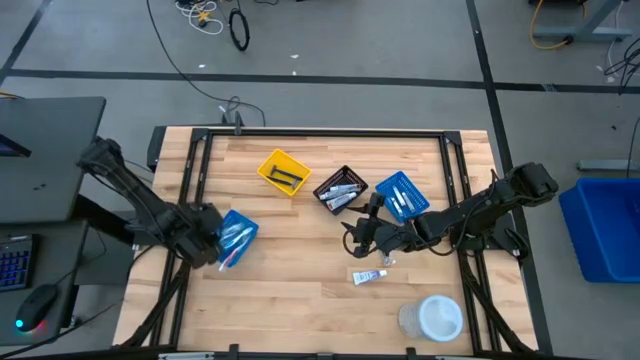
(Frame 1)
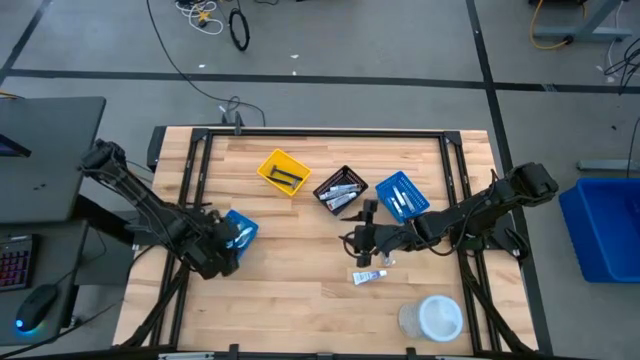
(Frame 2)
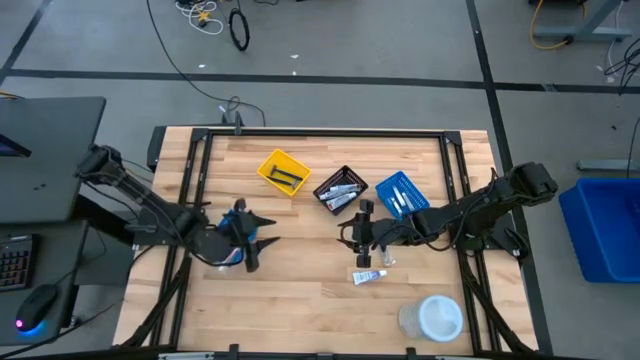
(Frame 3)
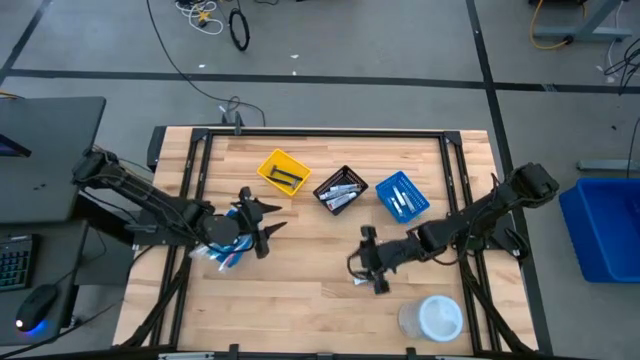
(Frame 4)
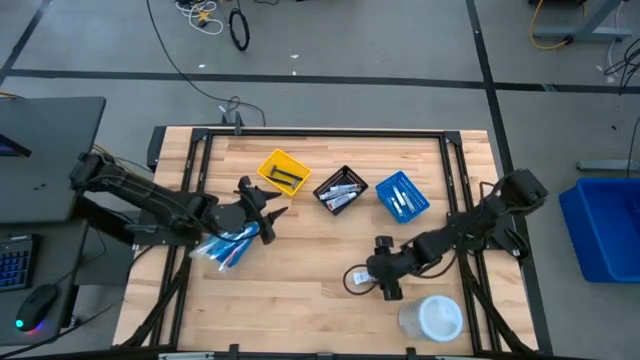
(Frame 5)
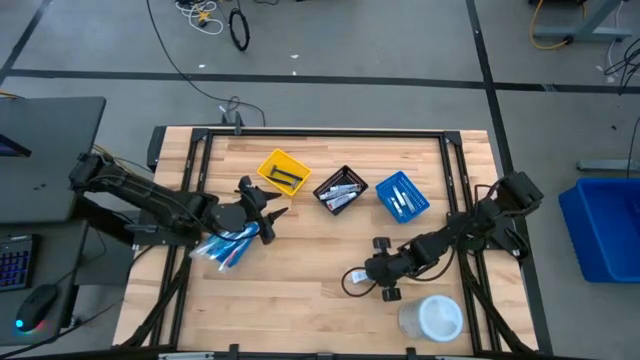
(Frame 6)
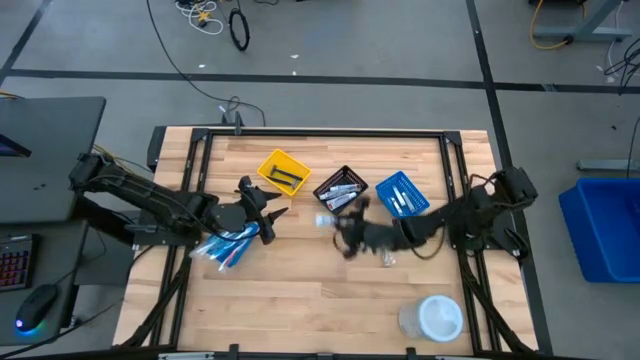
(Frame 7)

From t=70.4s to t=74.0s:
Task: Pick & Place Travel size toiletries
Put the white toothpaste into the black bin

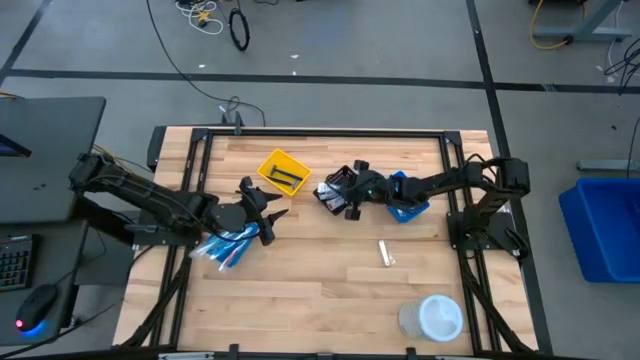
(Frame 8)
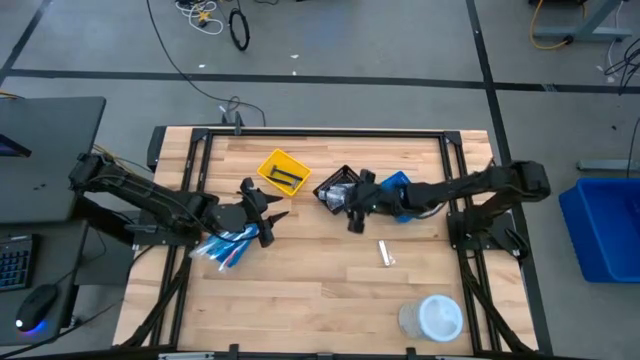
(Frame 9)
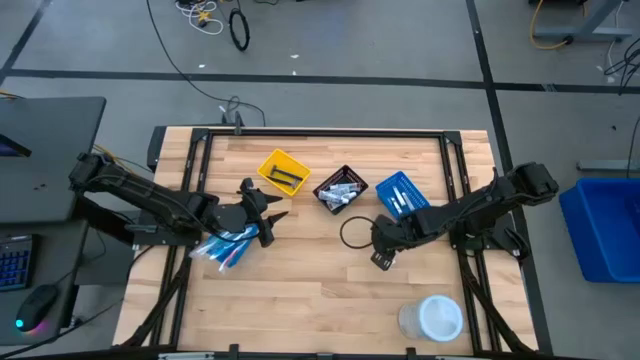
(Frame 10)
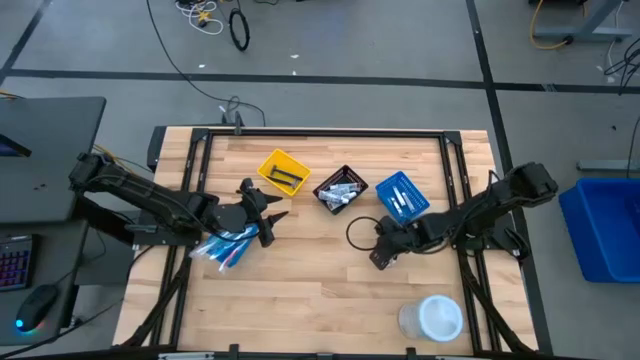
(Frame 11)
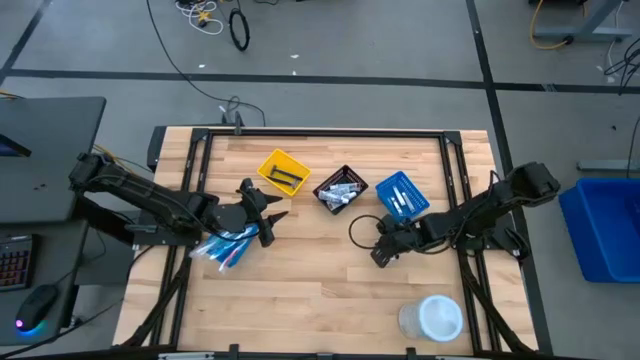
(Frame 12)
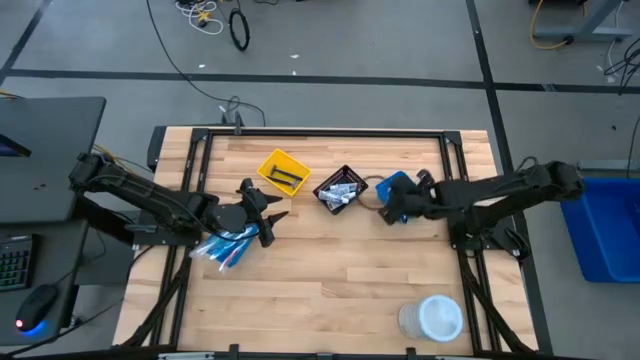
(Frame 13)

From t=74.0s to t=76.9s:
Put the silver nail cutter into the right blue bin

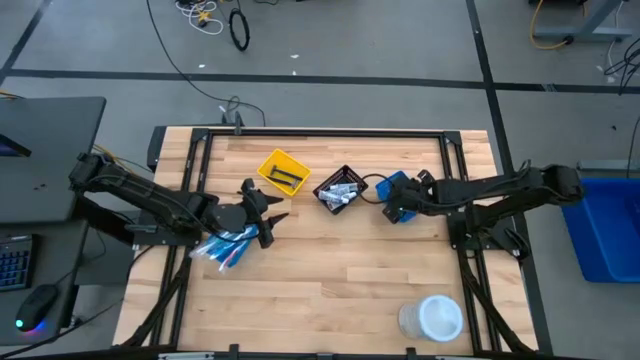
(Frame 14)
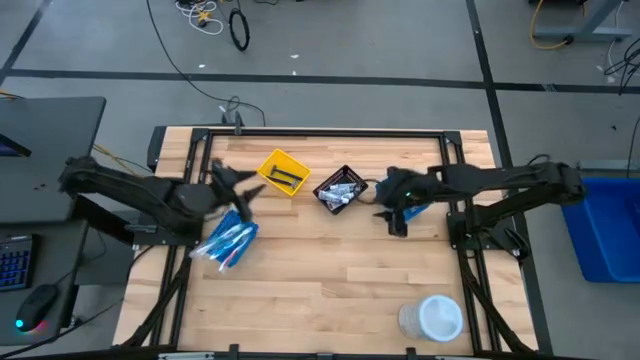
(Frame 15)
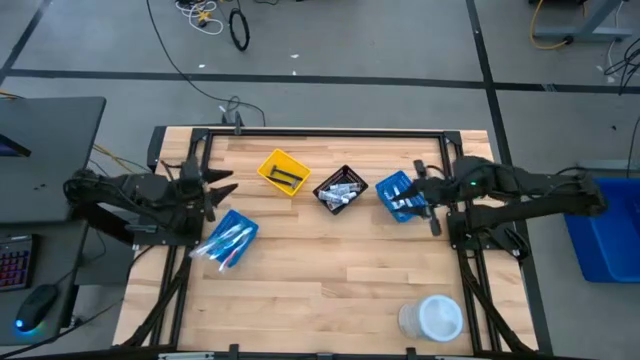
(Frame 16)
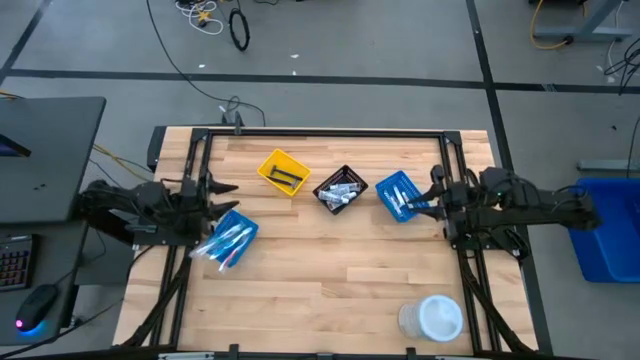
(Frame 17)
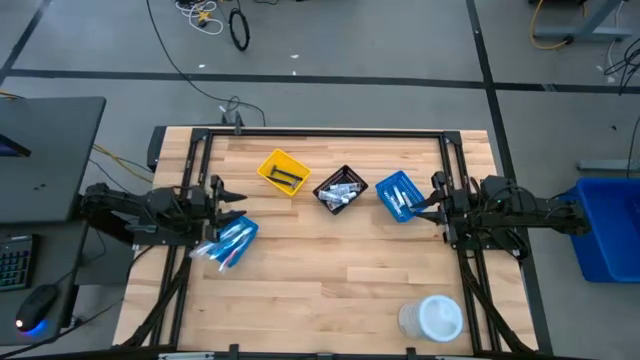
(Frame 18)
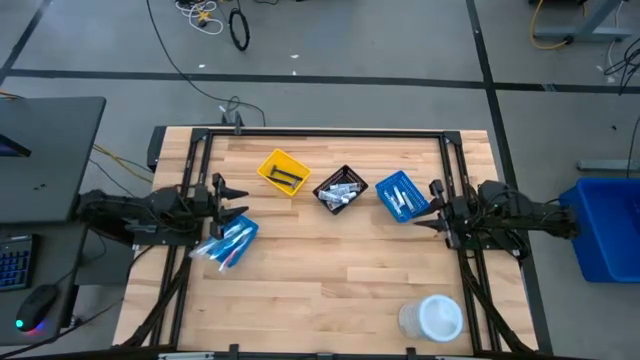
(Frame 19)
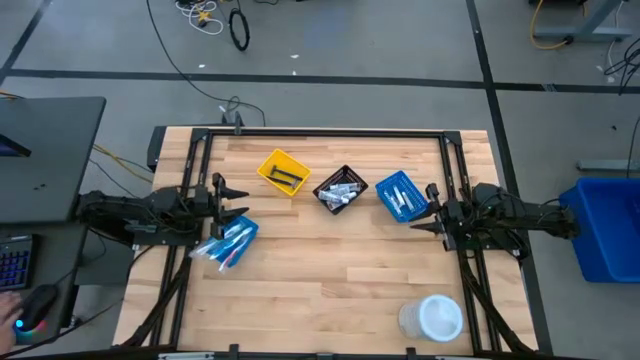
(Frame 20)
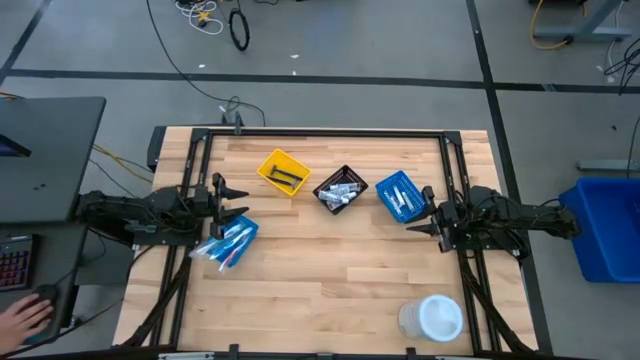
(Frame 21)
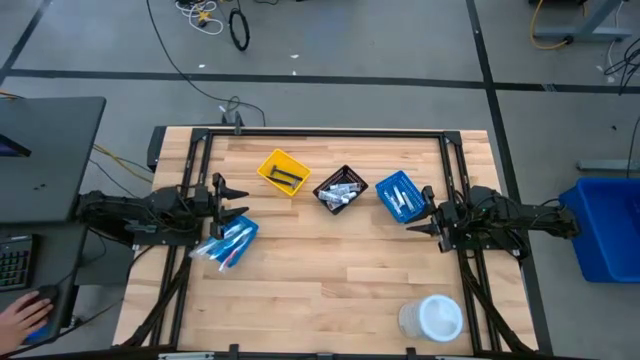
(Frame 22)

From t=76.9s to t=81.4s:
Return to Home Position

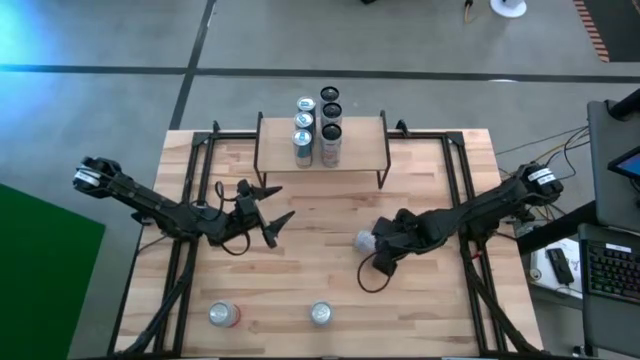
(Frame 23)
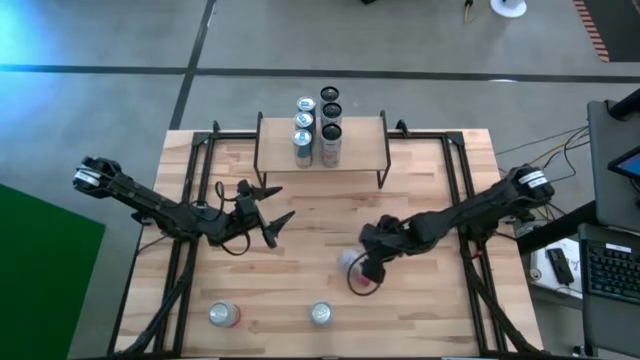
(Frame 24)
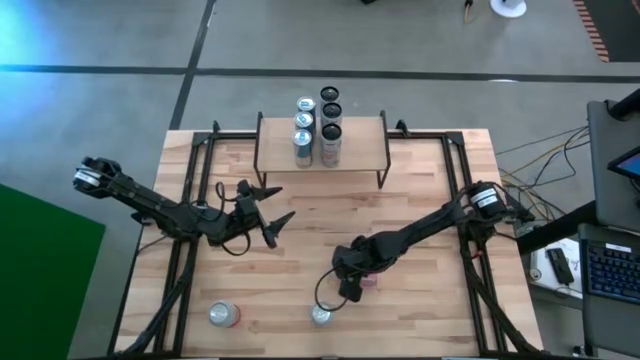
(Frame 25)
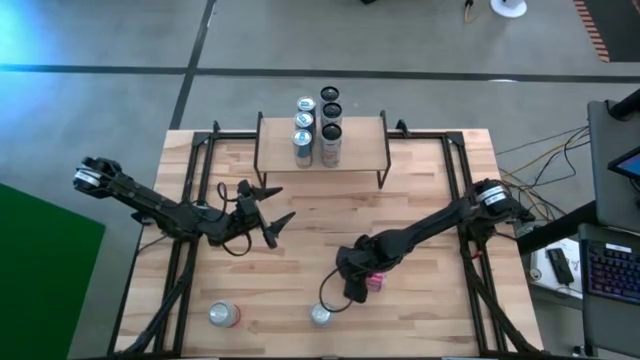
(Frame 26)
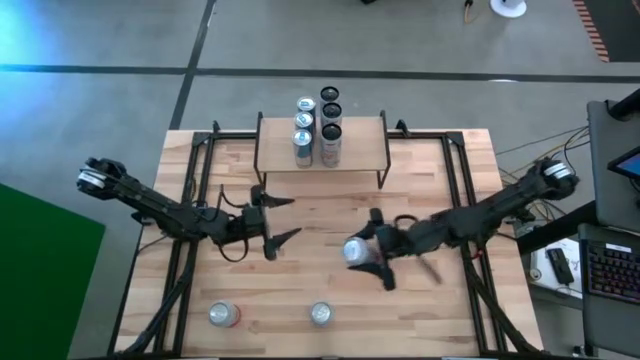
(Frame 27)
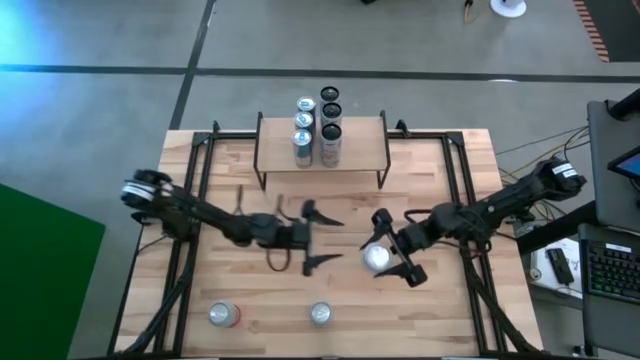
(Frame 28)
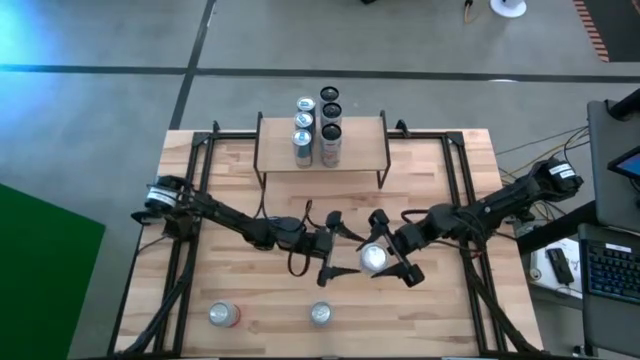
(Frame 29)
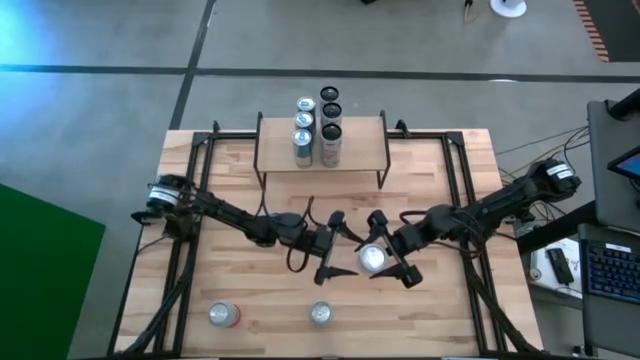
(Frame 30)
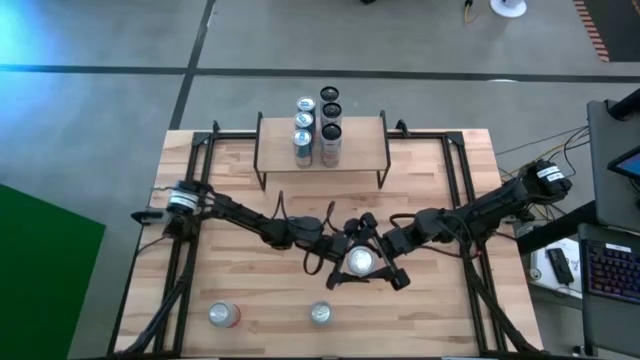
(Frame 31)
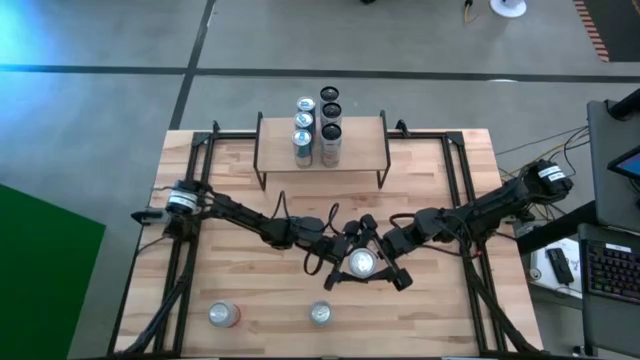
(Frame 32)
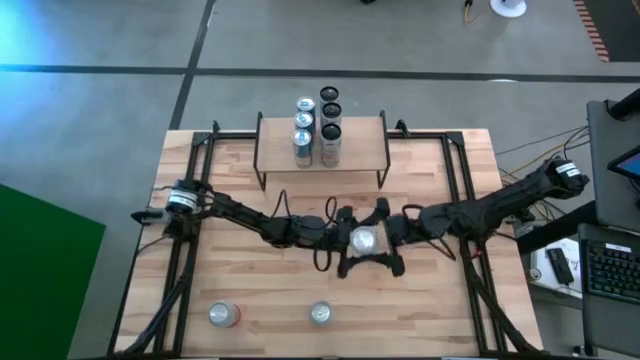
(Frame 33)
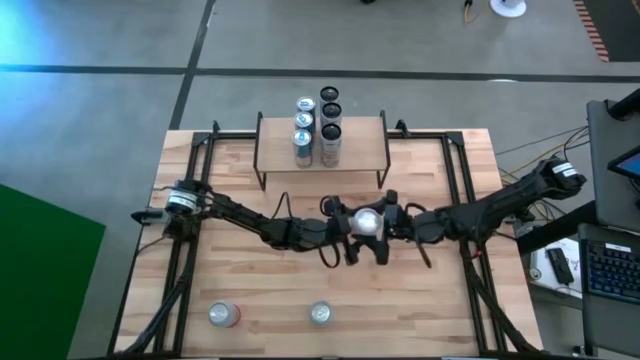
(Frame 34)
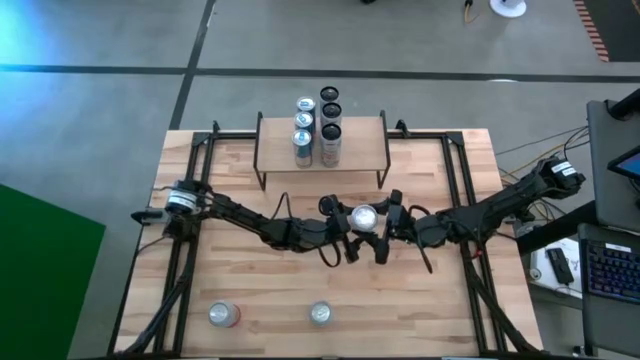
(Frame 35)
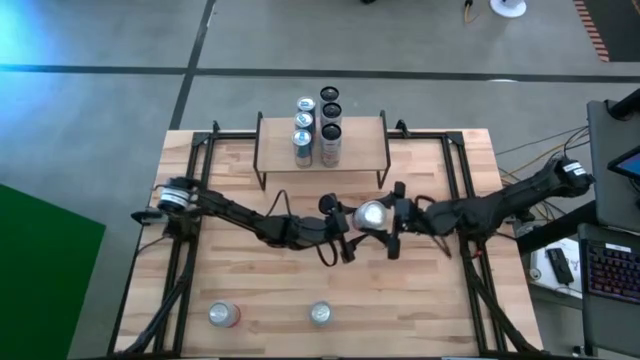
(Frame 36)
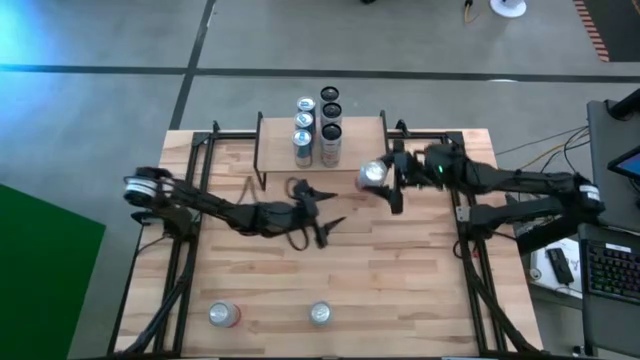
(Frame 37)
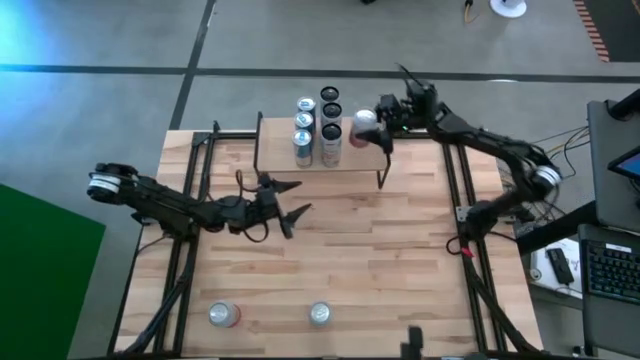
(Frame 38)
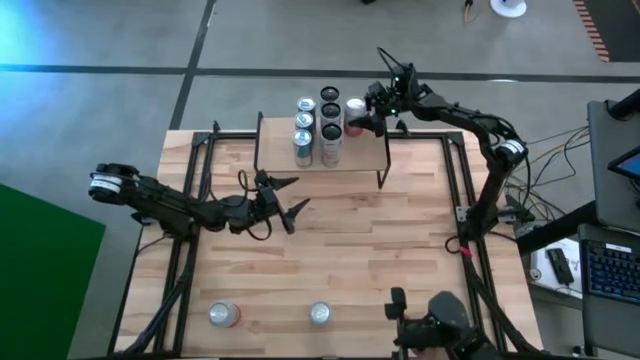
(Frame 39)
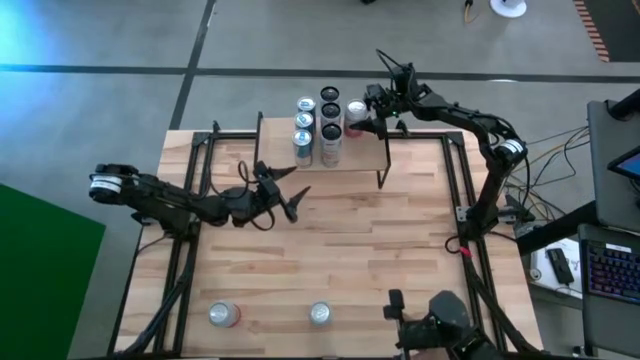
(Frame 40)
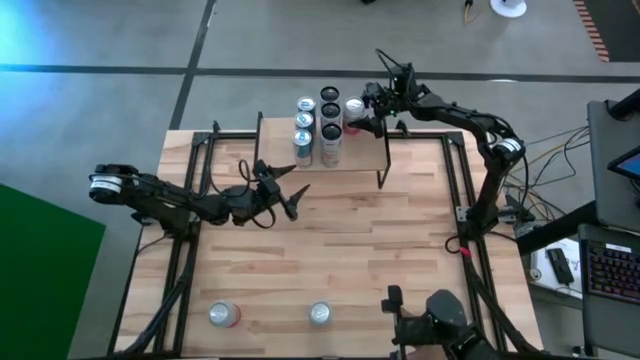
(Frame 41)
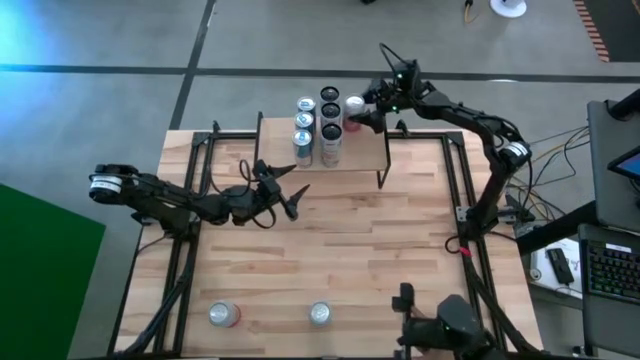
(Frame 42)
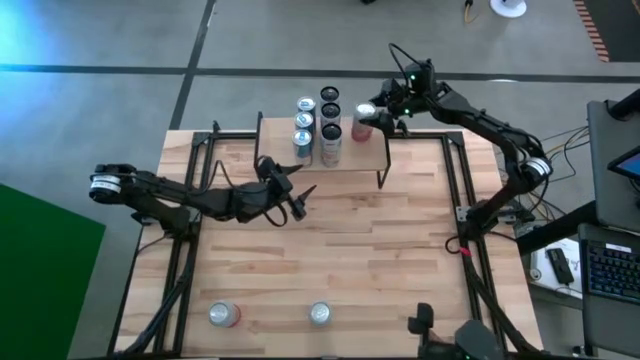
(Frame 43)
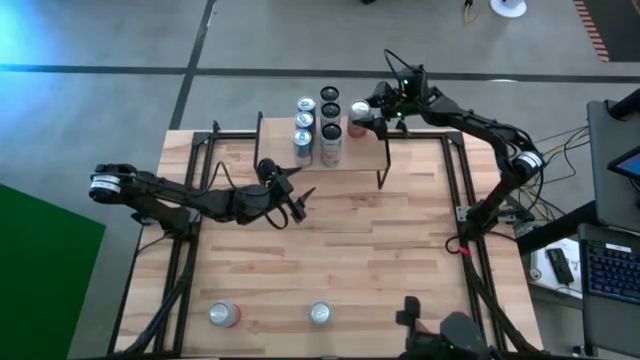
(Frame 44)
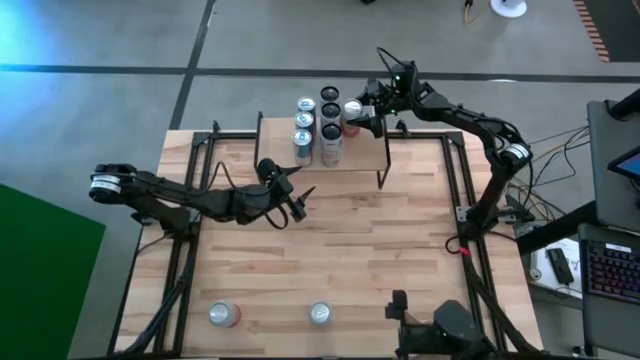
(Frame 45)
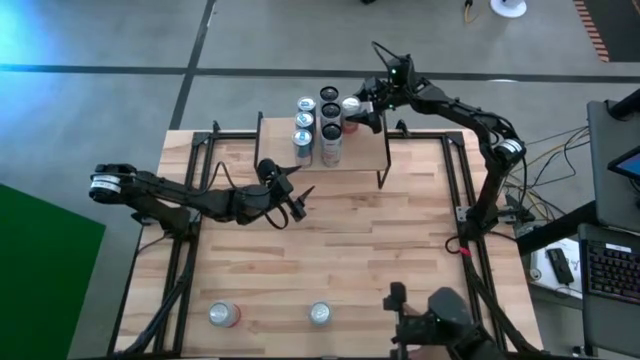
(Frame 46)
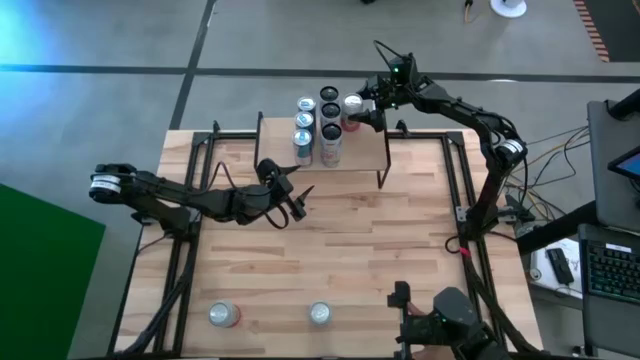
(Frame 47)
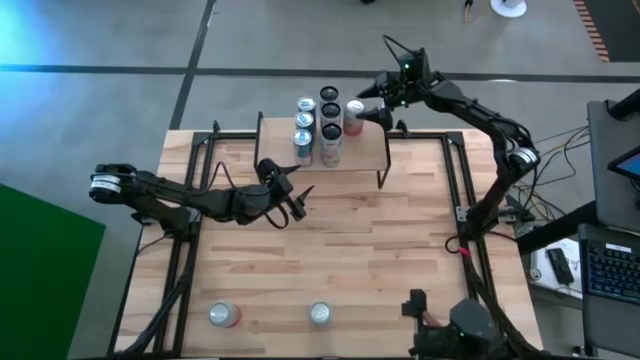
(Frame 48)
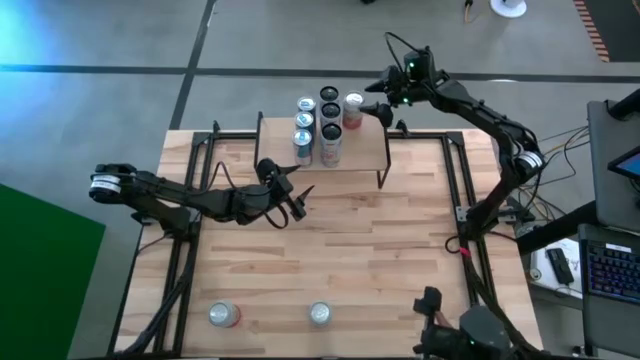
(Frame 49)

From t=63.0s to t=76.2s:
Task: Place canned beverage on shelf
Put the middle right pink-white soda can on the shelf
